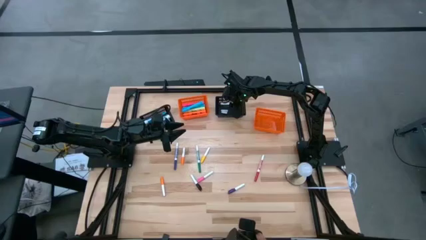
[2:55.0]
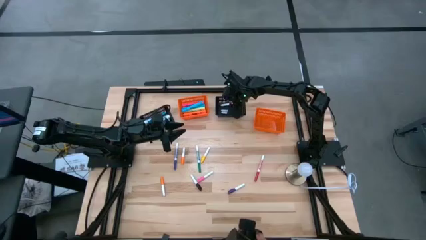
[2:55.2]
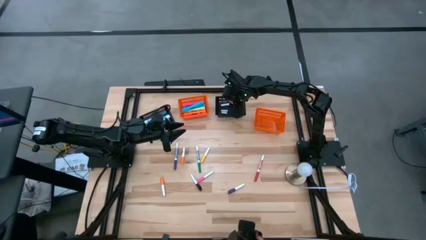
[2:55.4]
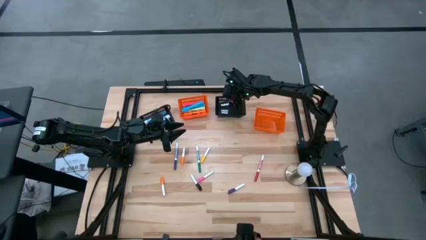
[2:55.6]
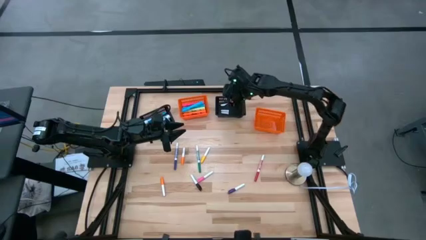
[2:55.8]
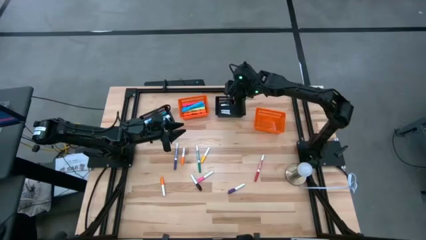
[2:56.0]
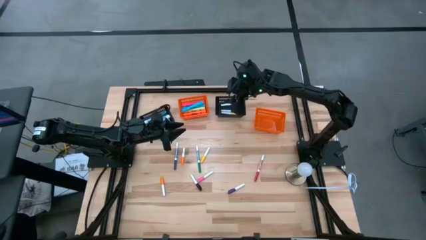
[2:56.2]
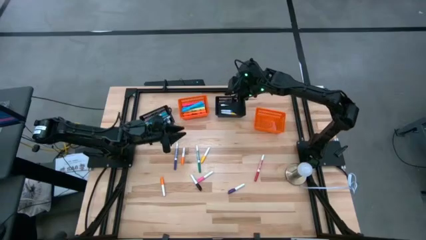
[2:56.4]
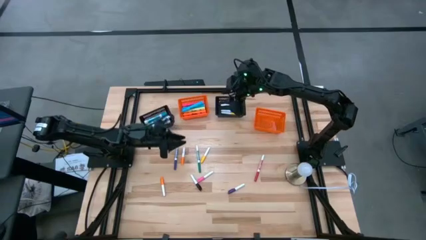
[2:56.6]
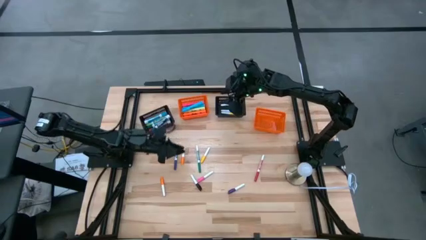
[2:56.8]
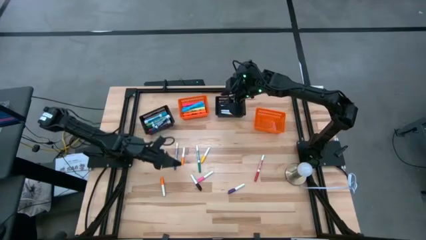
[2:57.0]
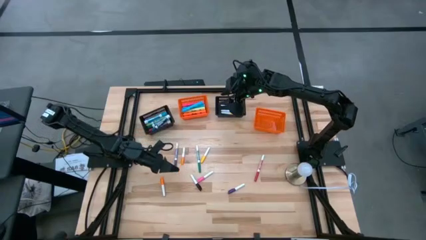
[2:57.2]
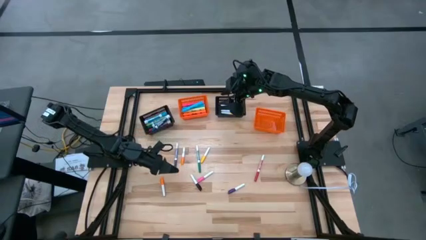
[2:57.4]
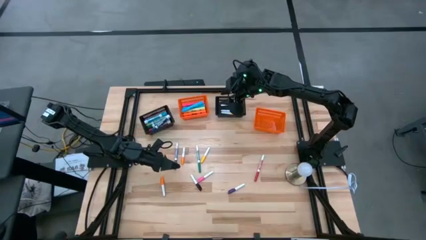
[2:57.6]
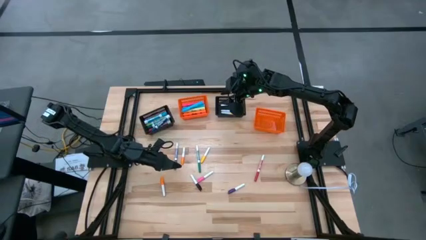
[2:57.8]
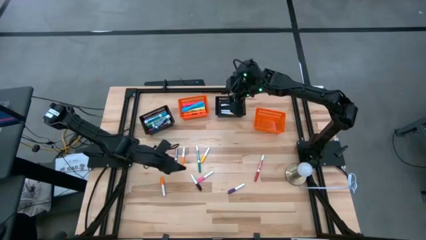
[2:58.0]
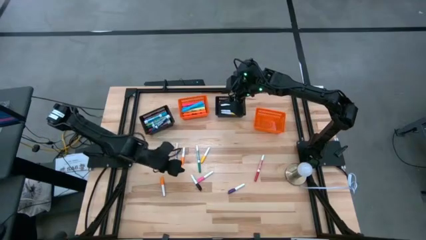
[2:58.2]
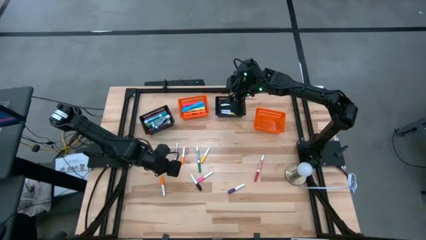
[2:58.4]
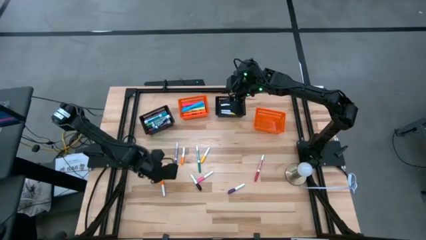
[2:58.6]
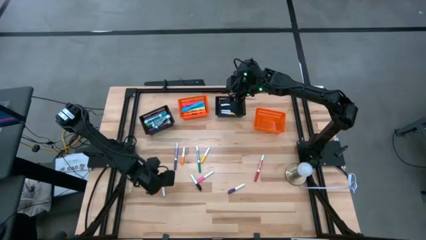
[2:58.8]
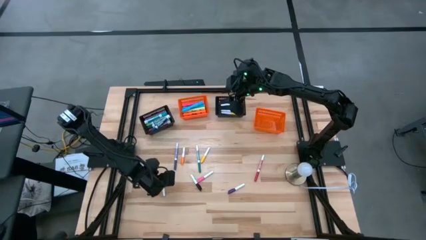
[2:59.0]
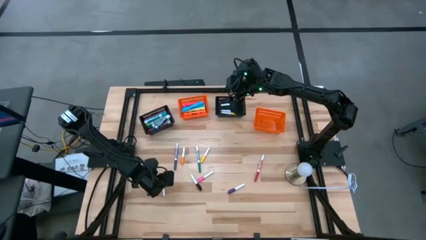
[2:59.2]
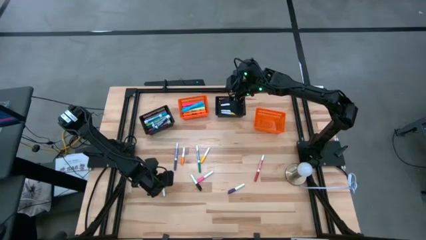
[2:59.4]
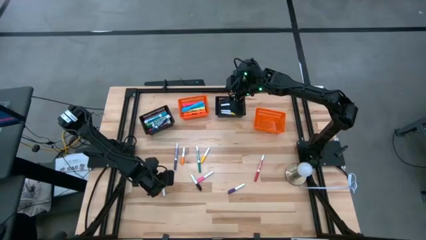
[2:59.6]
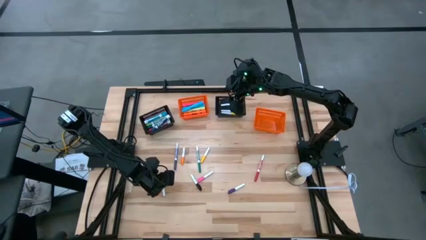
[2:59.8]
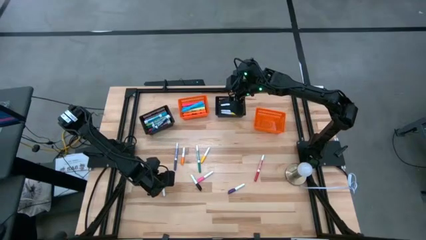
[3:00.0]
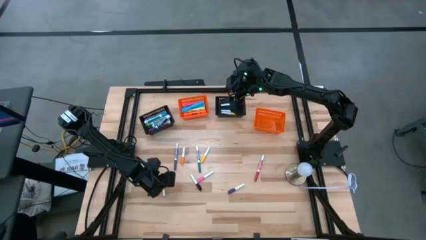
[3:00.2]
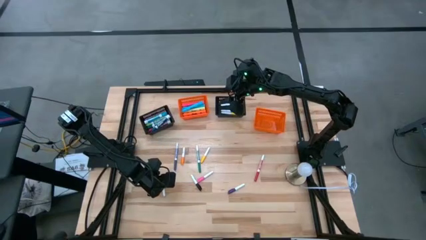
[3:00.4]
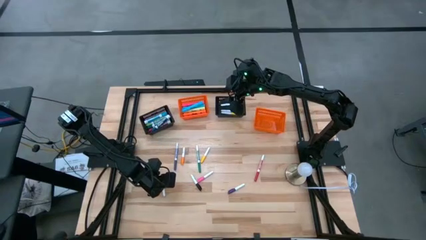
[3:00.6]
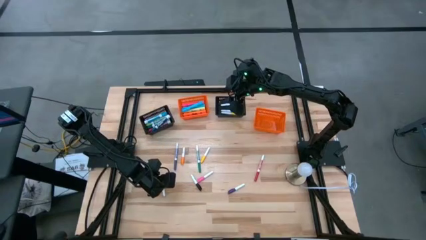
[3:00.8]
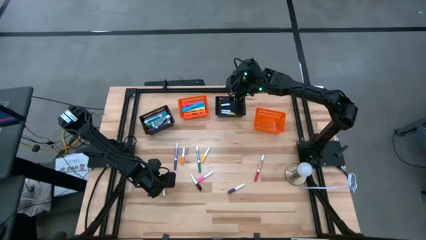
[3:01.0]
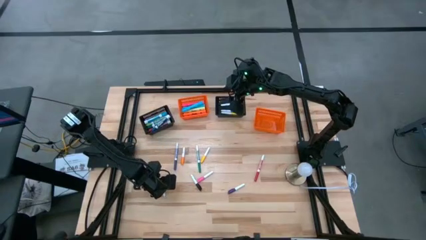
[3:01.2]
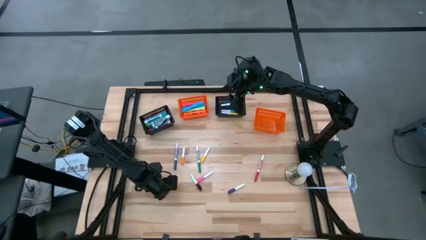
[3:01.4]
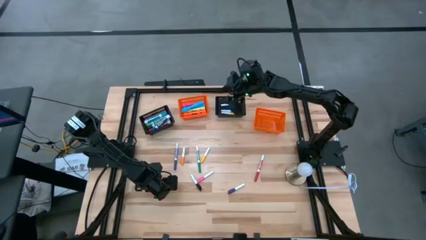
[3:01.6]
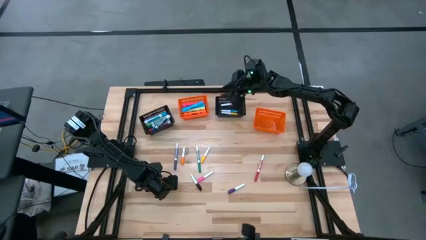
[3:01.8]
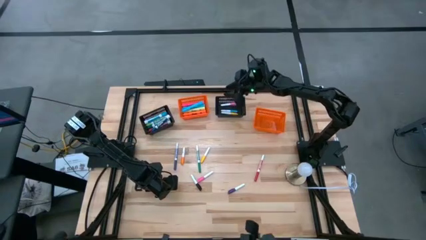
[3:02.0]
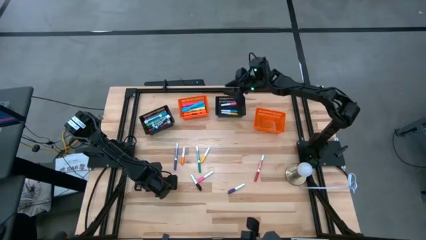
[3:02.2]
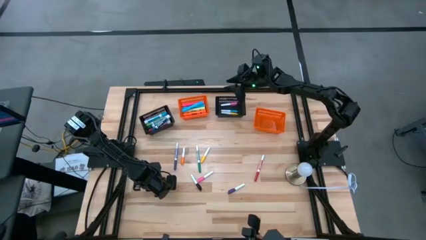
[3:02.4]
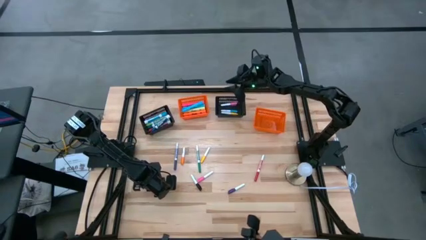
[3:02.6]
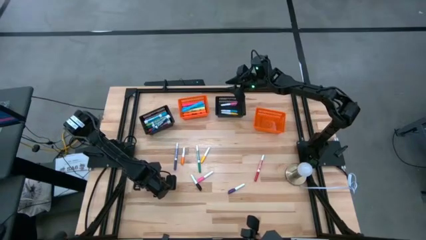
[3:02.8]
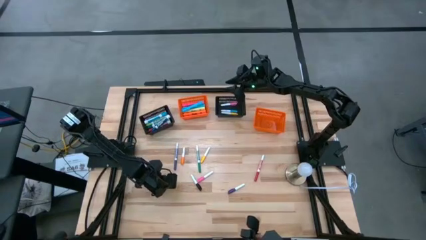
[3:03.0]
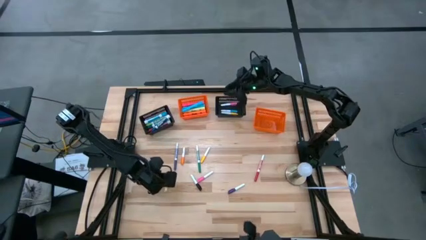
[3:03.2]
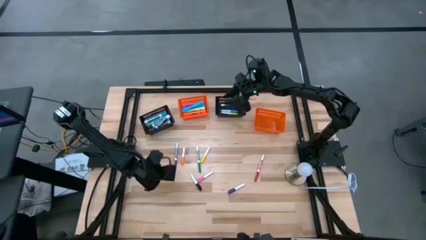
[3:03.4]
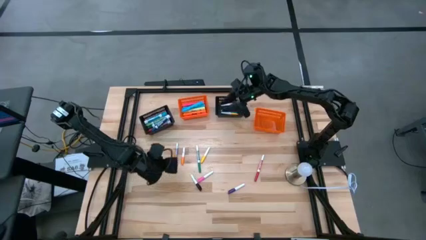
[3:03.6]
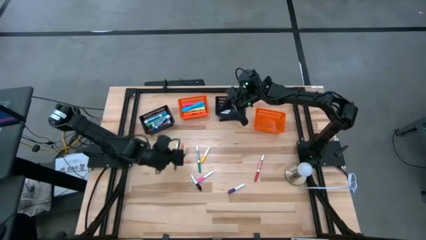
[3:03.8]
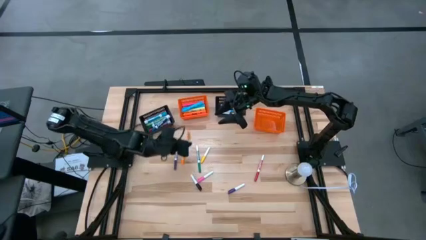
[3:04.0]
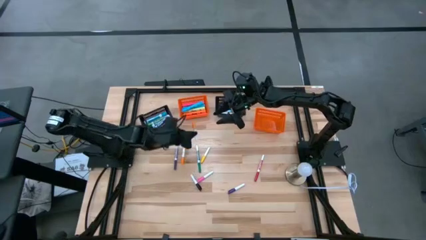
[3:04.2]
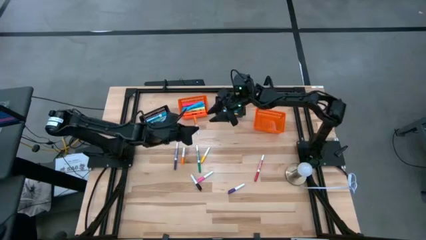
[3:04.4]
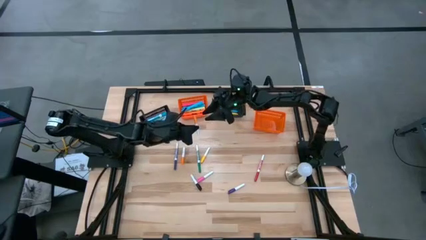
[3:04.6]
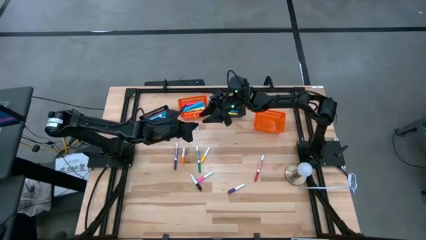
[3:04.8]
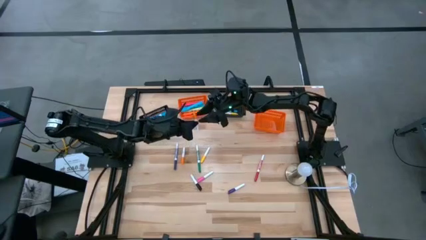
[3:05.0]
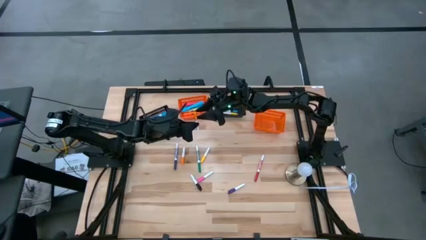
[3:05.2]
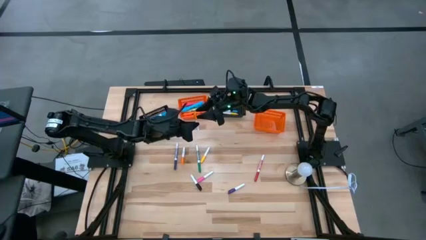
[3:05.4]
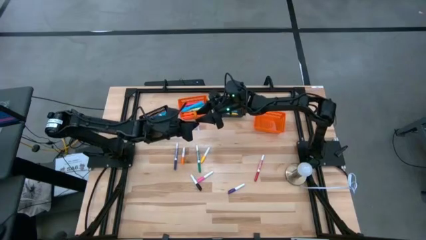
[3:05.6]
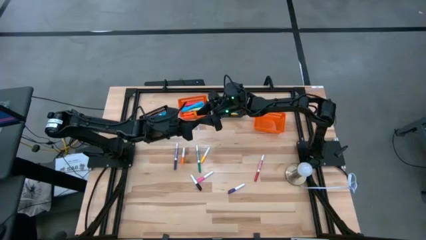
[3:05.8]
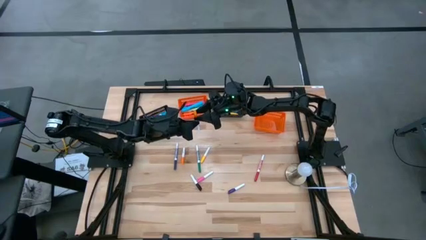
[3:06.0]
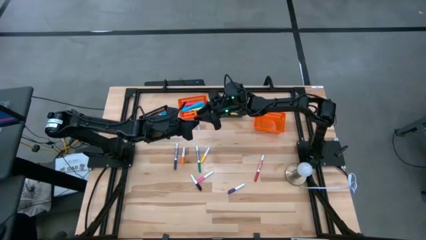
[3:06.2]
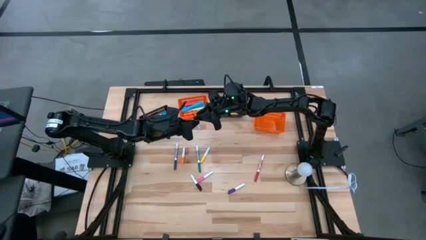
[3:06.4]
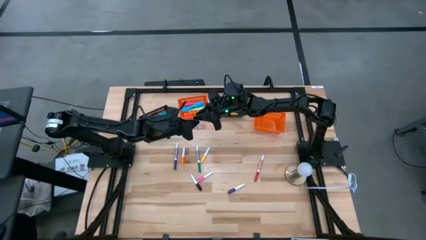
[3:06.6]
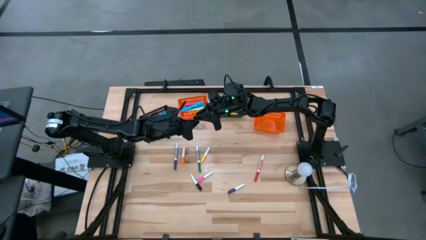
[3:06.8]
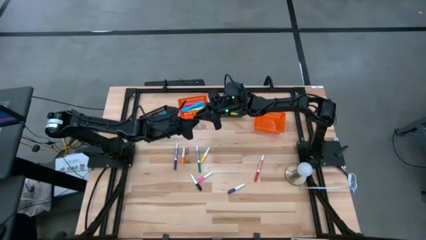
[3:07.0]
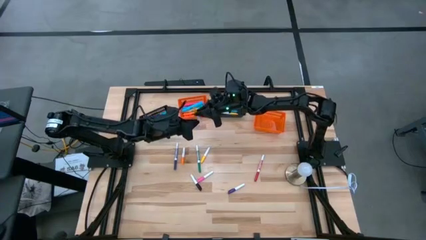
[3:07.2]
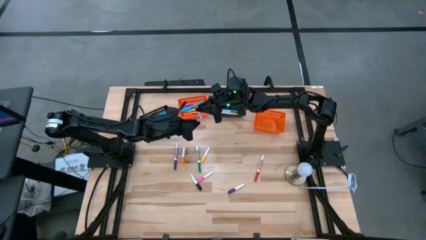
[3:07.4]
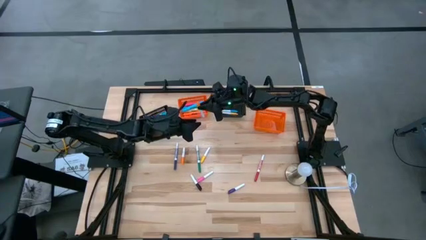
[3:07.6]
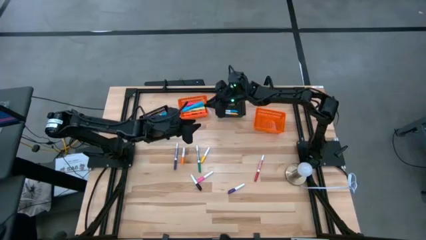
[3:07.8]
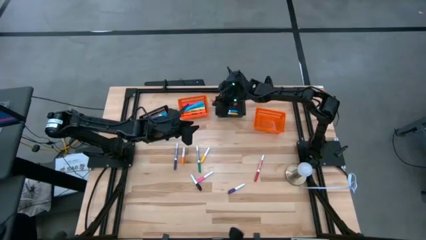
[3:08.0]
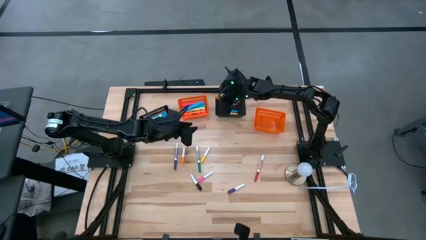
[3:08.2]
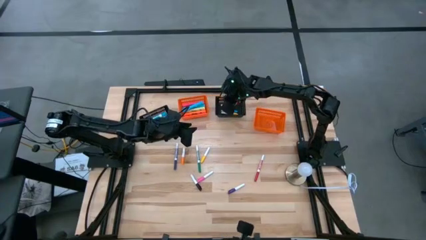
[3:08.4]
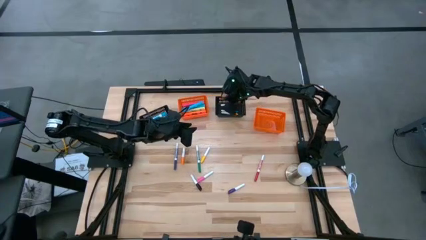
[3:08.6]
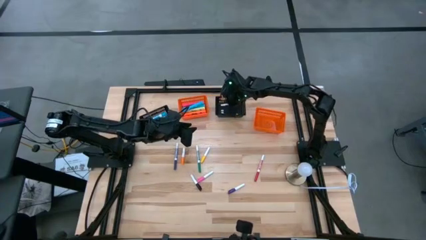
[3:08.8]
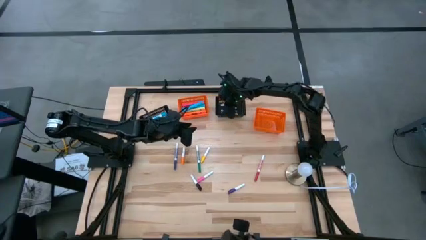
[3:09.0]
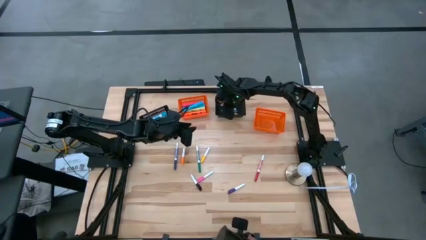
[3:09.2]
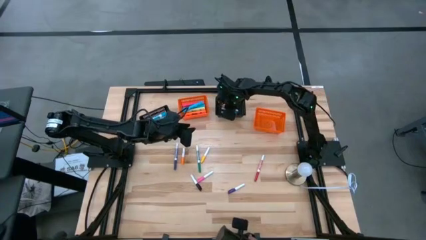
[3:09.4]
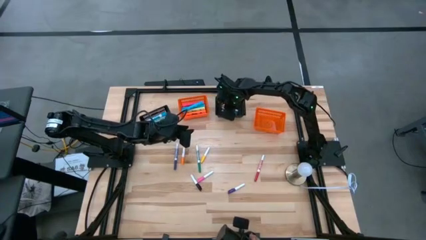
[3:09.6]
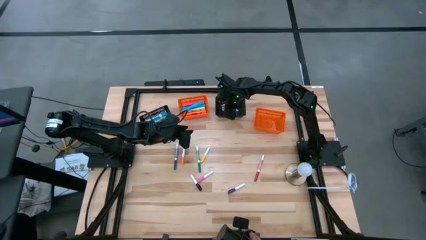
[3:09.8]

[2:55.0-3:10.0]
Task: Pick & Place Markers
Put the bottom small orange highlighter pen into the right black bin
